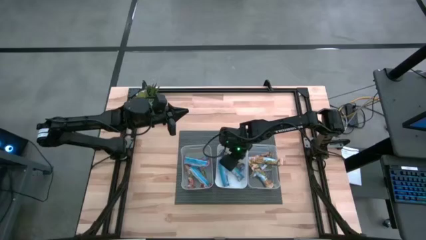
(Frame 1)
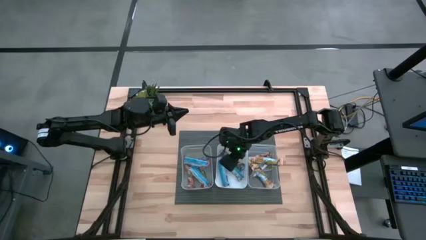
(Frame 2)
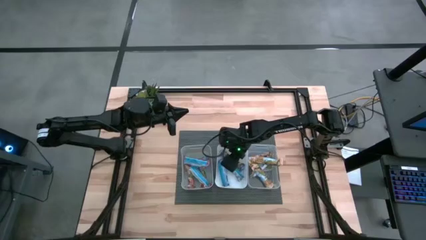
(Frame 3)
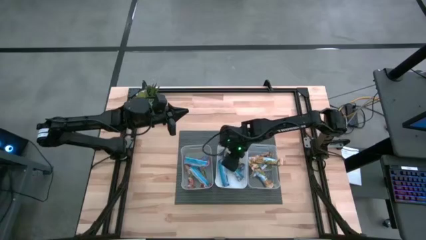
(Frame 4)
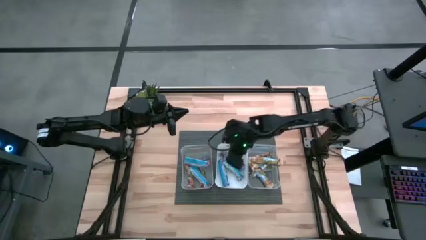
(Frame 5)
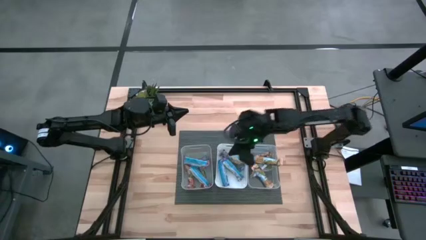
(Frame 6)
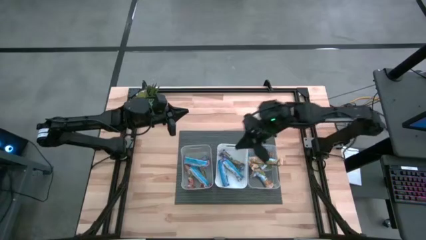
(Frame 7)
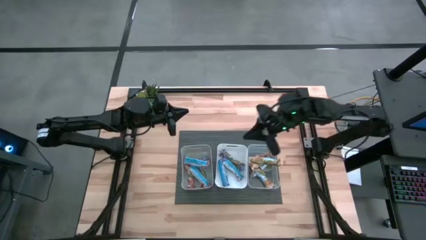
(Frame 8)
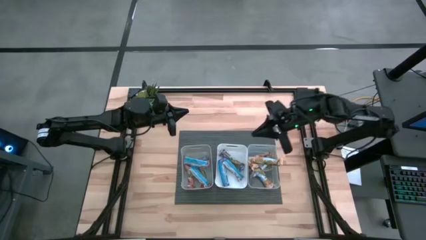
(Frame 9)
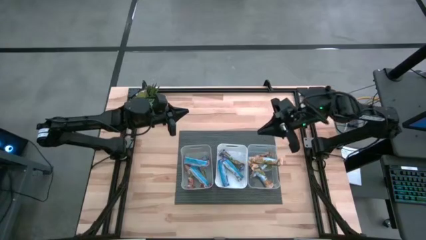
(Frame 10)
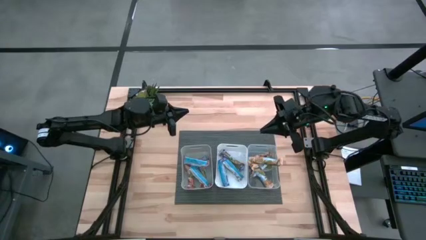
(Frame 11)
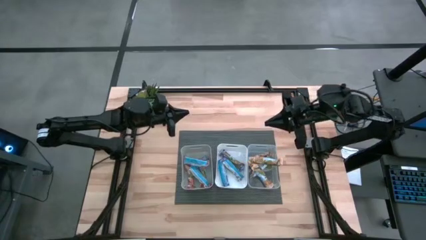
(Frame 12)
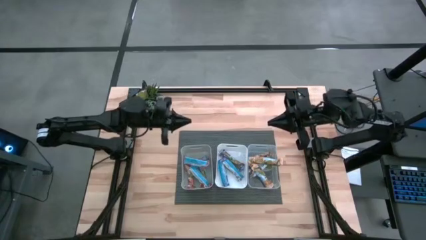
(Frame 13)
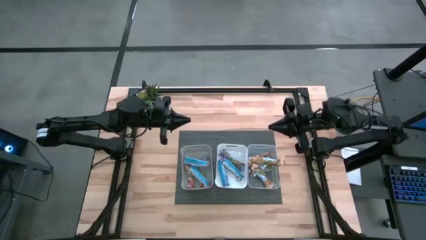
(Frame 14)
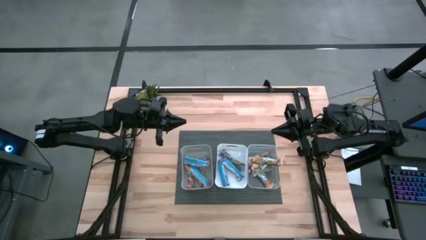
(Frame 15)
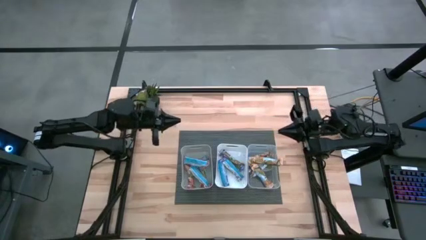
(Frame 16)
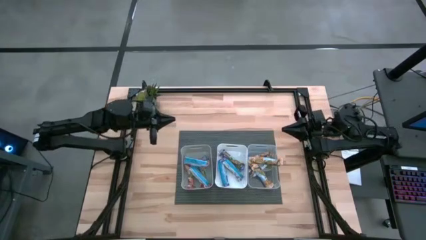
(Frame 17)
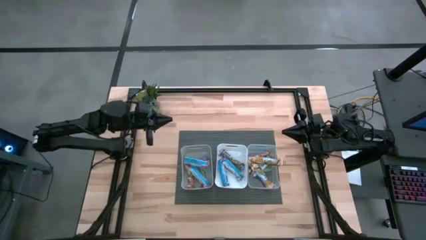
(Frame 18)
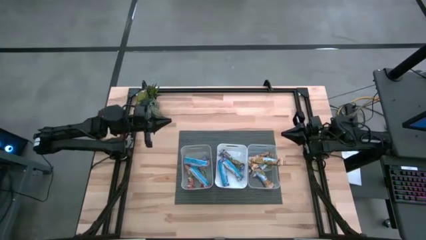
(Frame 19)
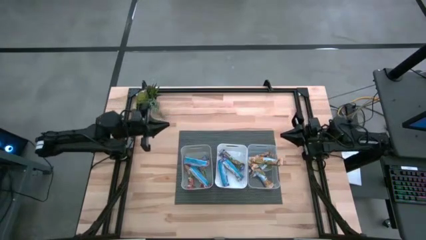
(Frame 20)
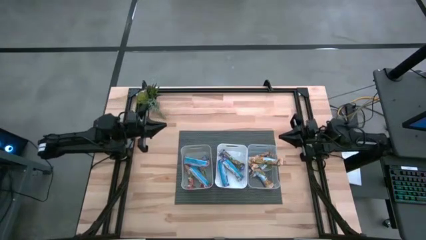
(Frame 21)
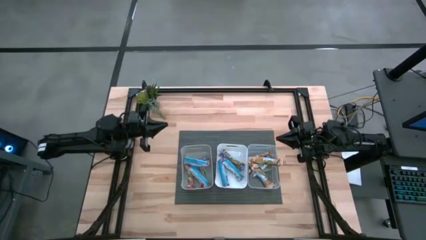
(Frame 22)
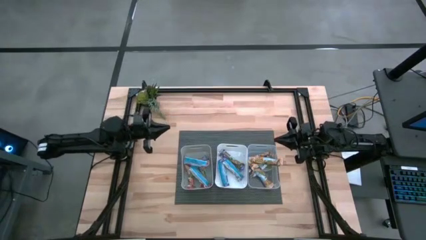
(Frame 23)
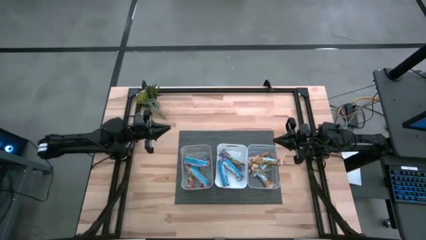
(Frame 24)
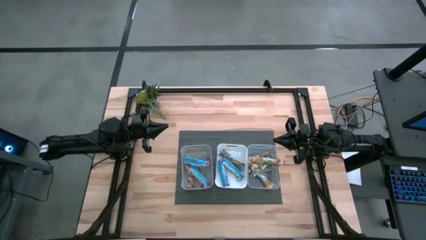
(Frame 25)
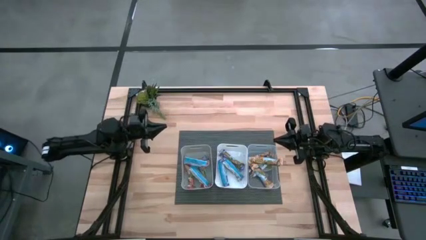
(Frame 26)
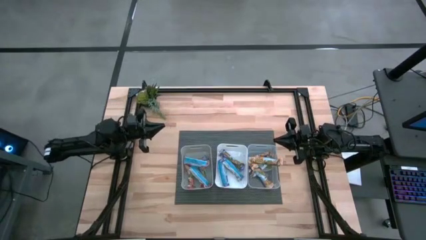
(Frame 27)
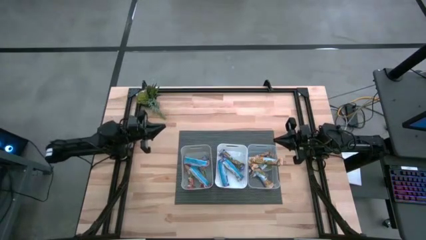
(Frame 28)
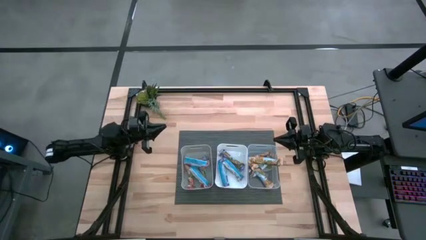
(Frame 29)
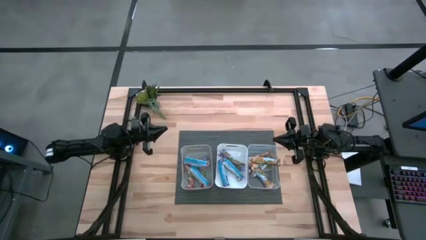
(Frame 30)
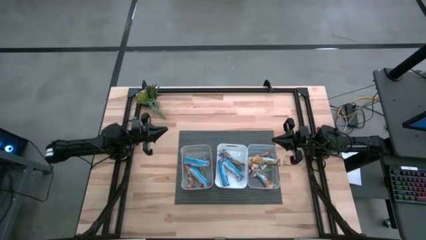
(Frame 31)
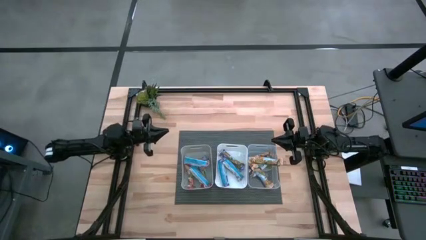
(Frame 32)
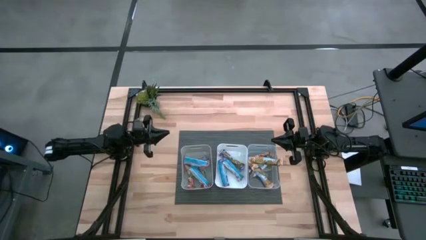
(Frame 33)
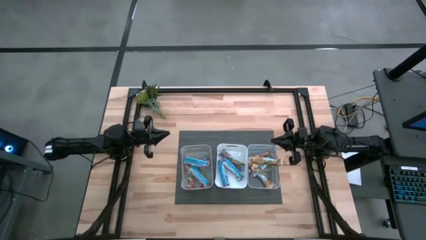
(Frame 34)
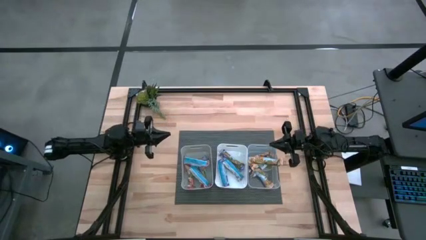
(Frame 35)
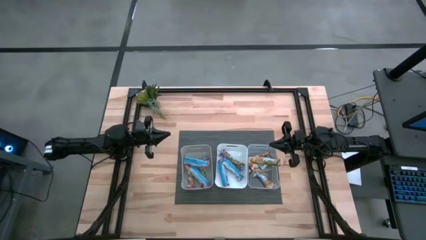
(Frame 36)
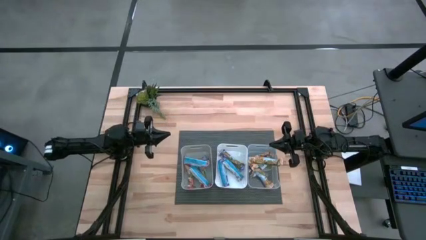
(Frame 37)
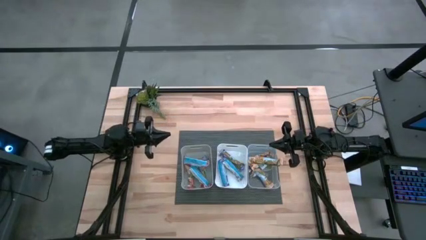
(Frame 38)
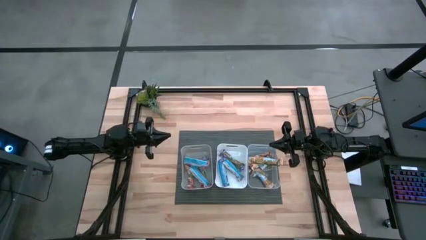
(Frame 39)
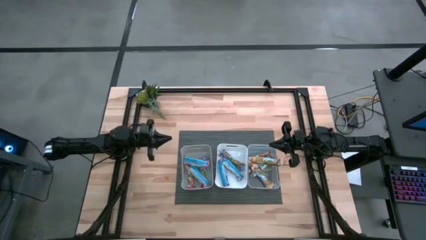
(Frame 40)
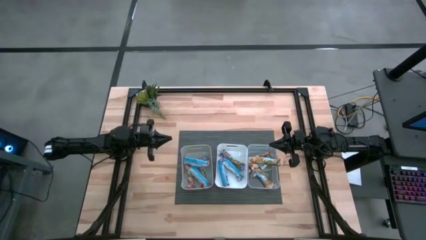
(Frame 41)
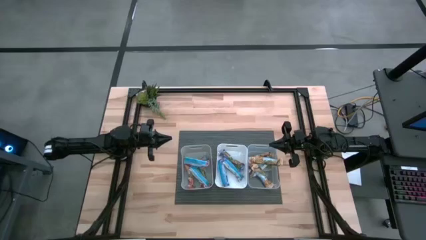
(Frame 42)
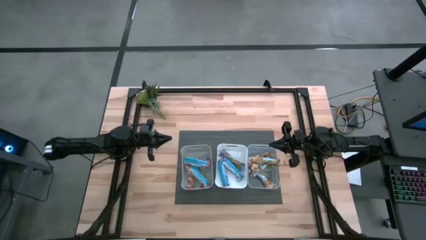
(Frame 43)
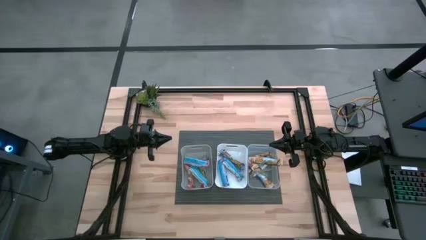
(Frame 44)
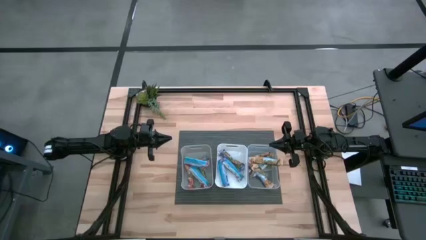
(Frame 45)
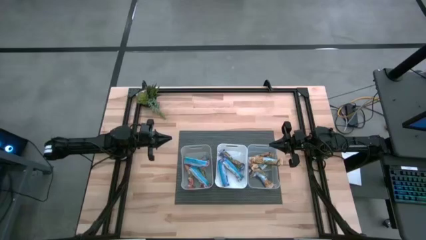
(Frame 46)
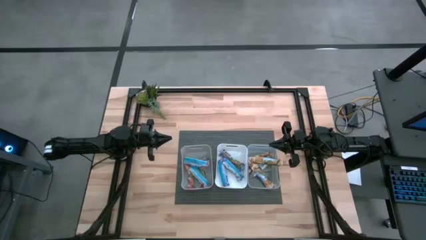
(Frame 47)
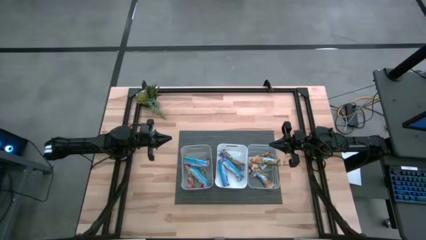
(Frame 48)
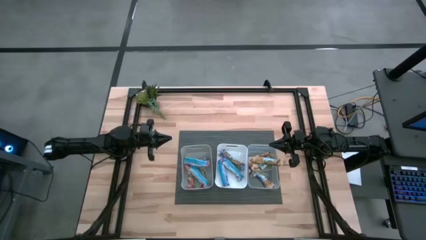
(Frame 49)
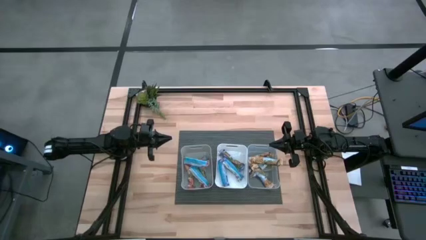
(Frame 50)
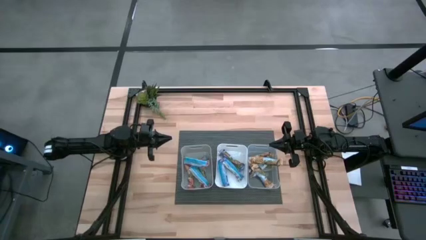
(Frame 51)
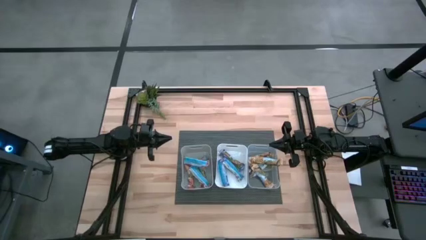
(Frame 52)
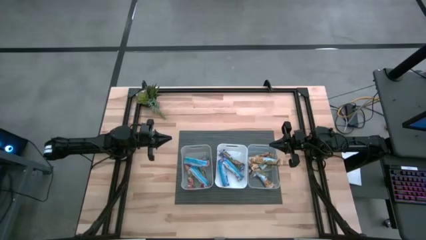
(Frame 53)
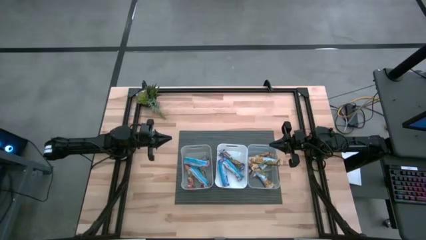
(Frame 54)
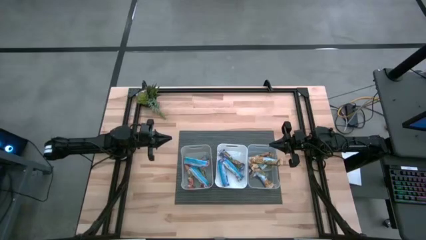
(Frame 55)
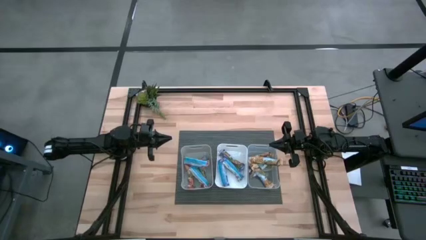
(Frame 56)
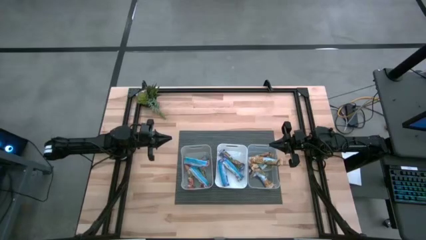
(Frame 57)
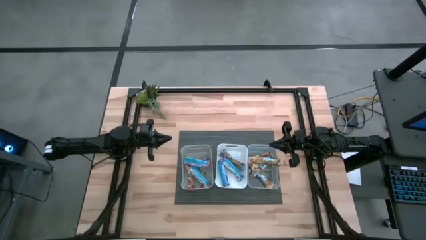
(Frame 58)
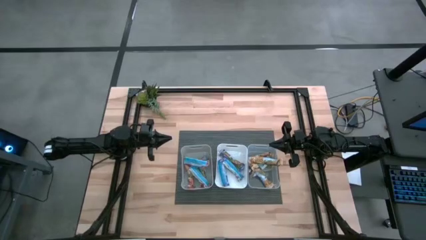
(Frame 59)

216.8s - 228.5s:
Task: Pick and place Granola Bars by type
Return to Home Position

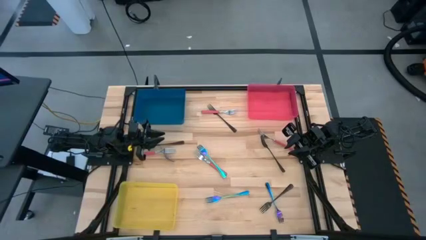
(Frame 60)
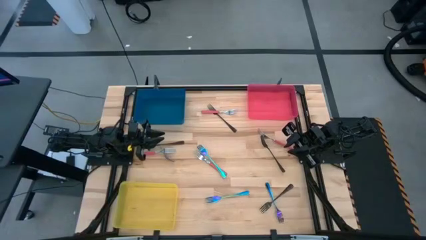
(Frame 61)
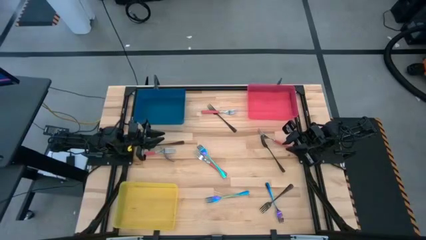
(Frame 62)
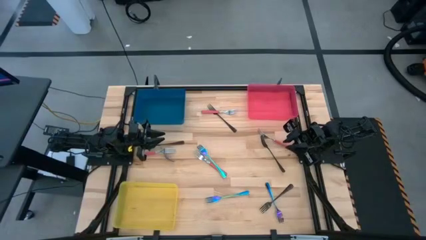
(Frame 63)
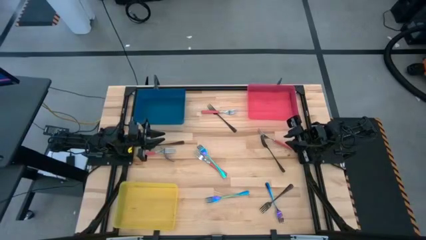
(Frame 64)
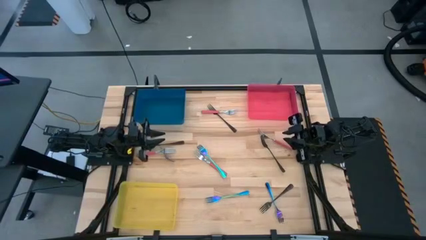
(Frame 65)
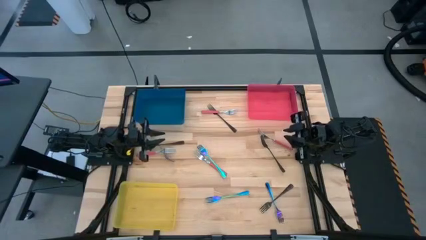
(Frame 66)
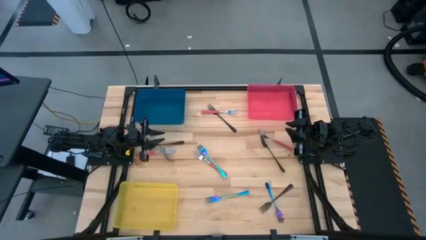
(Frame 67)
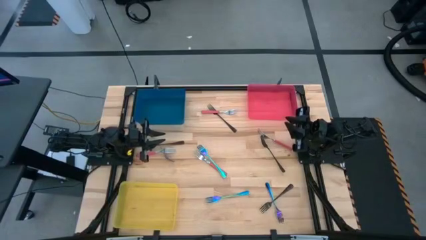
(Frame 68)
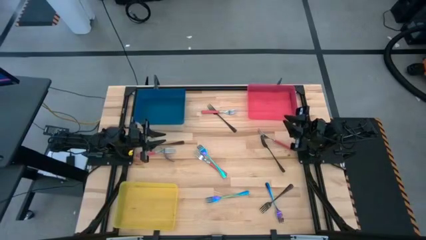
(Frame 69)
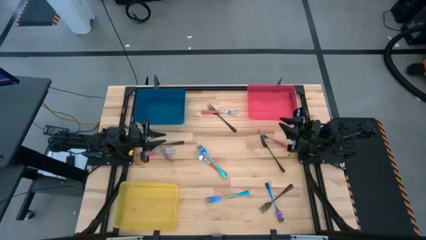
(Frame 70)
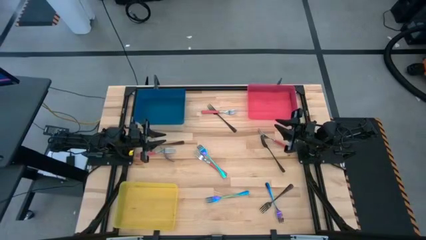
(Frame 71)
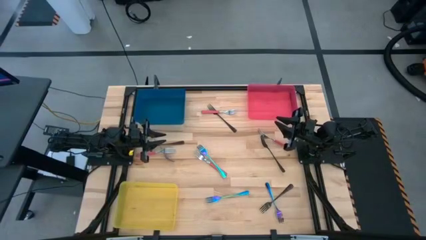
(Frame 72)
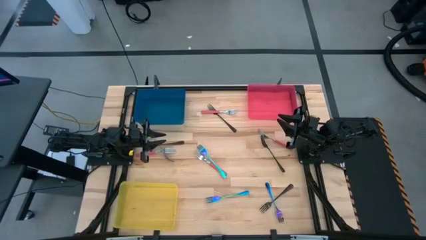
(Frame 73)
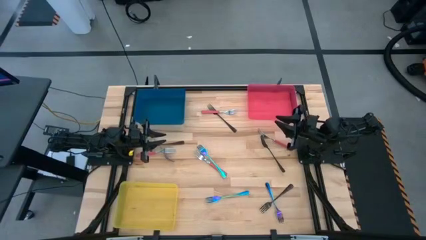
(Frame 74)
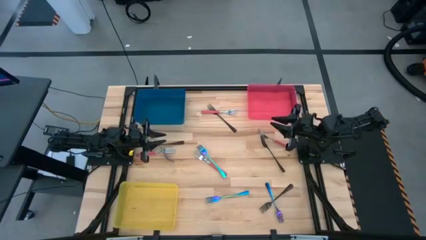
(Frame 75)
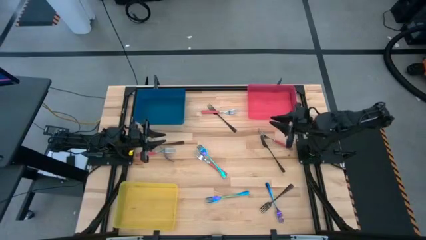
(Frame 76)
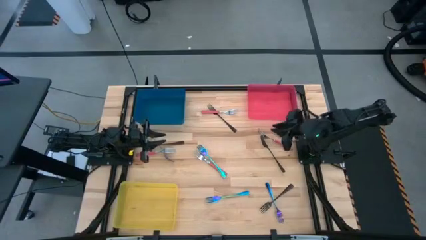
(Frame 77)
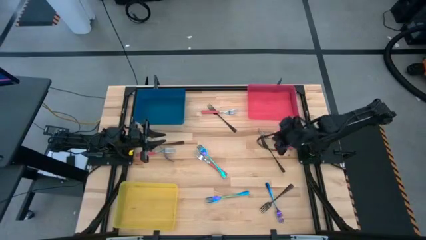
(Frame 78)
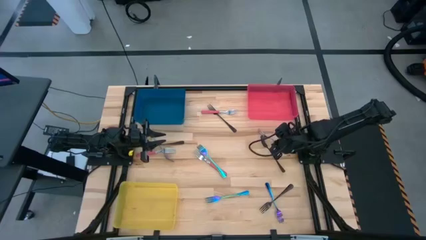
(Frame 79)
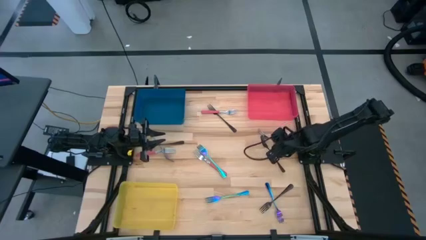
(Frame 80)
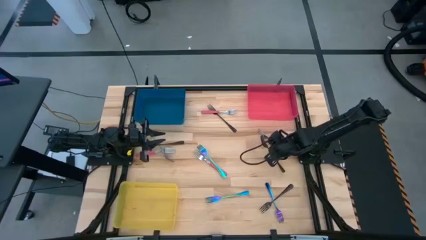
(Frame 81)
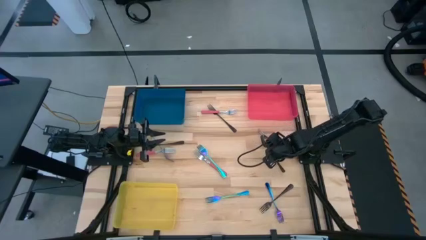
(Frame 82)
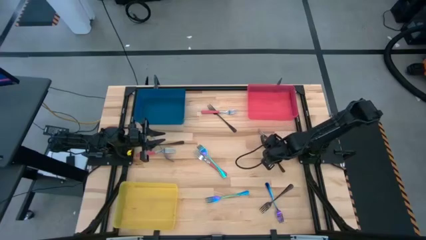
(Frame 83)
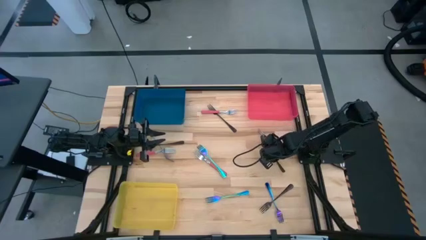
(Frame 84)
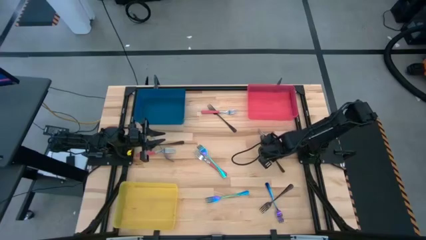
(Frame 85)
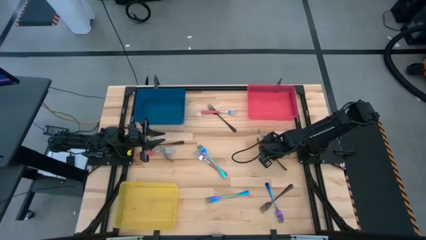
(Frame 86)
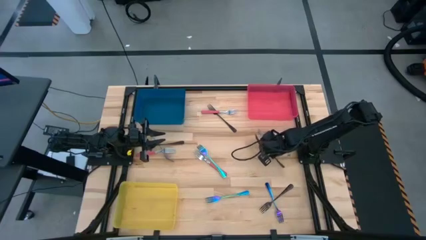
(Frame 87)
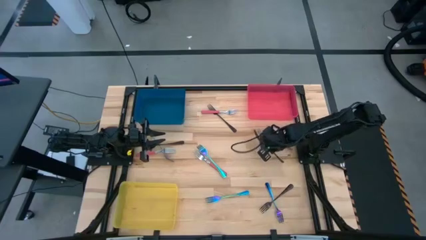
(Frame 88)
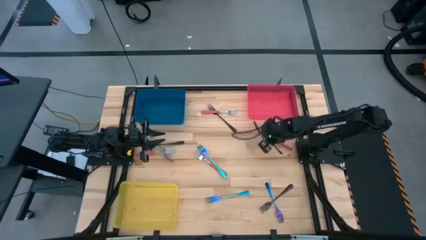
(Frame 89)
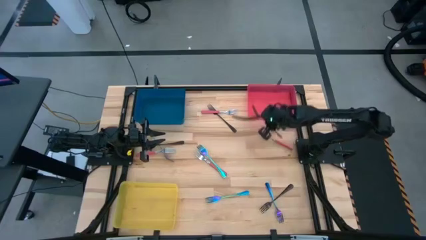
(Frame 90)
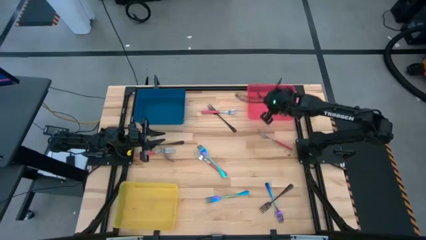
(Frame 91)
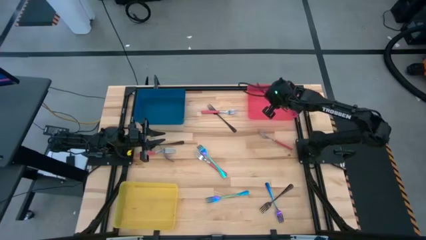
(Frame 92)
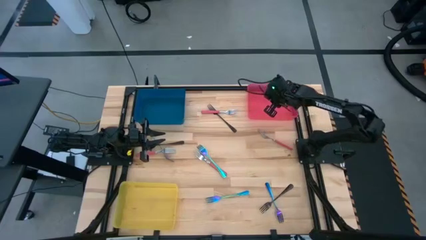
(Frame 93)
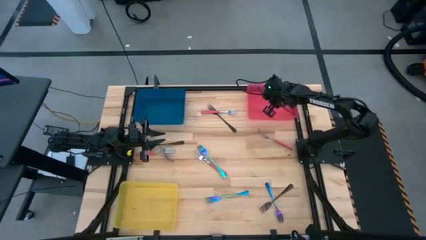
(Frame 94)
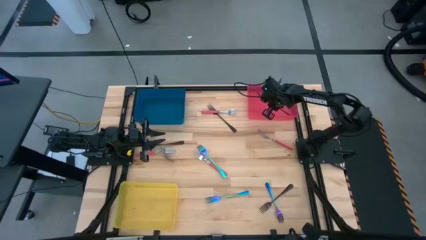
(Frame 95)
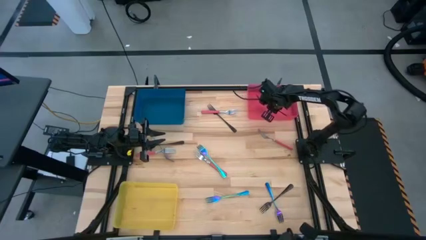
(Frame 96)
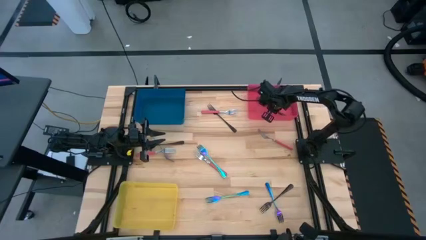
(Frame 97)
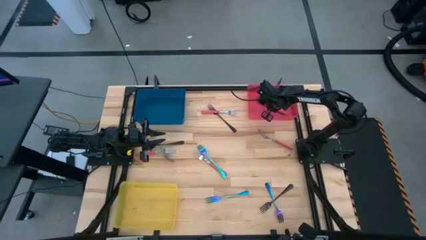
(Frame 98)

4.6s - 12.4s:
Task: Sort silverware by color (type)
Put the middle right black fork into the red bin
